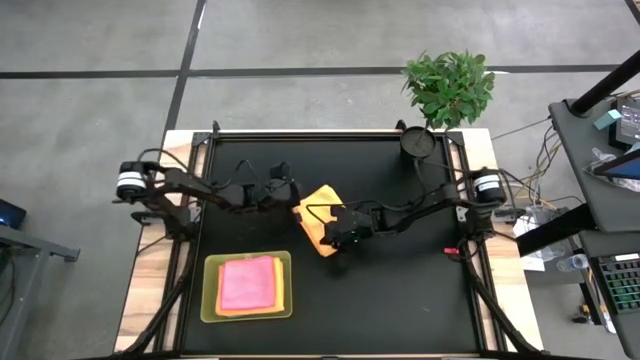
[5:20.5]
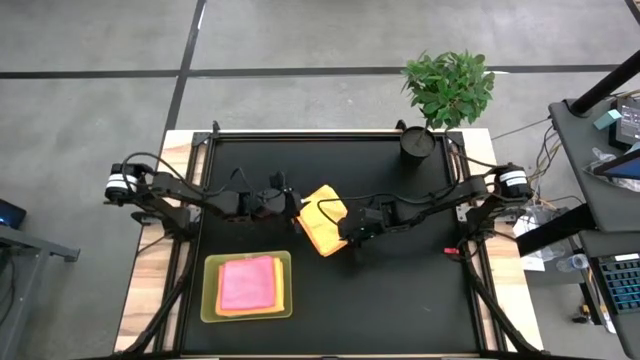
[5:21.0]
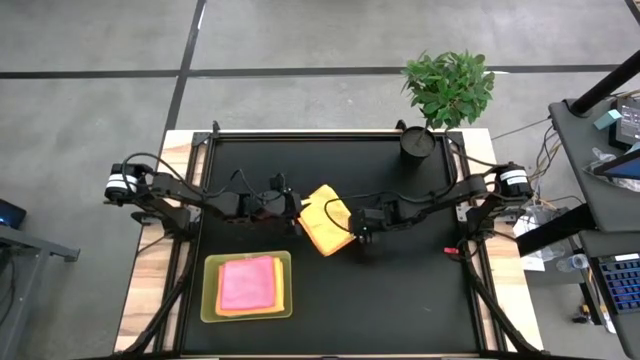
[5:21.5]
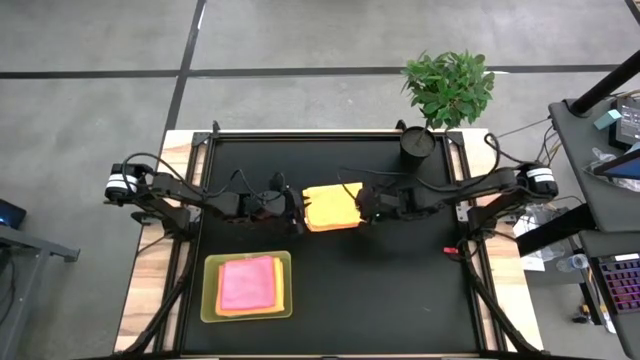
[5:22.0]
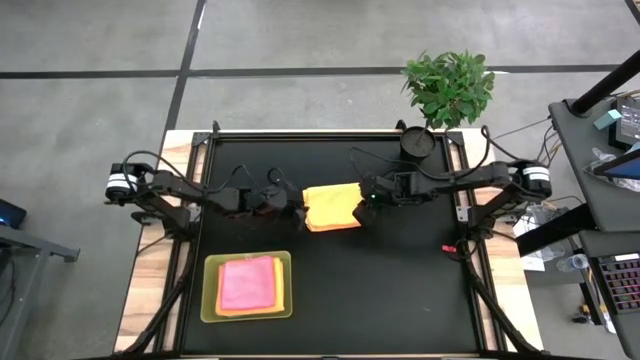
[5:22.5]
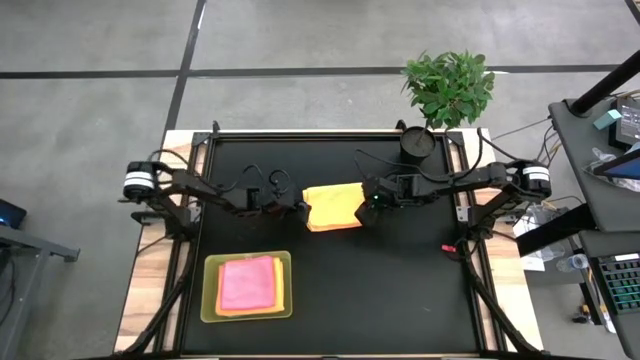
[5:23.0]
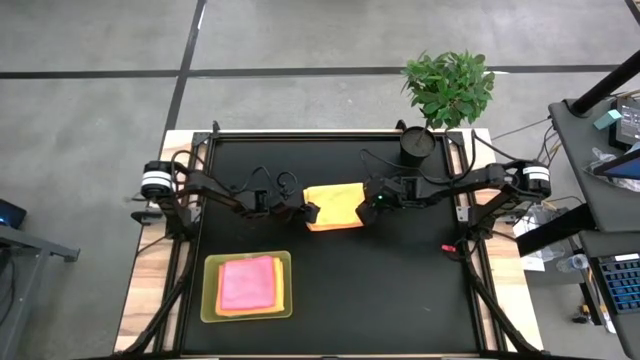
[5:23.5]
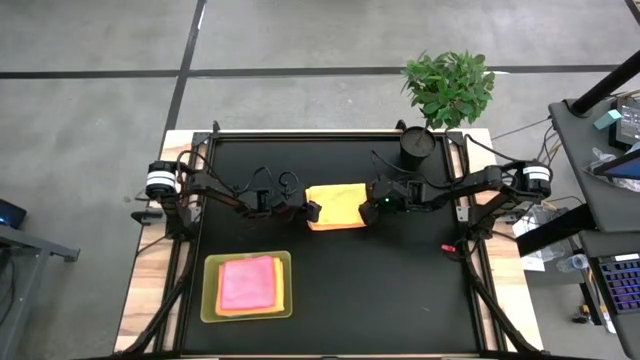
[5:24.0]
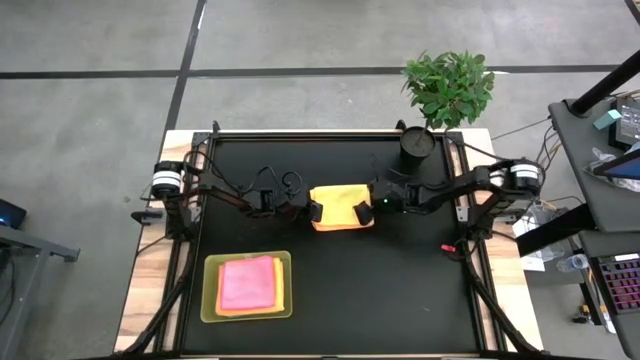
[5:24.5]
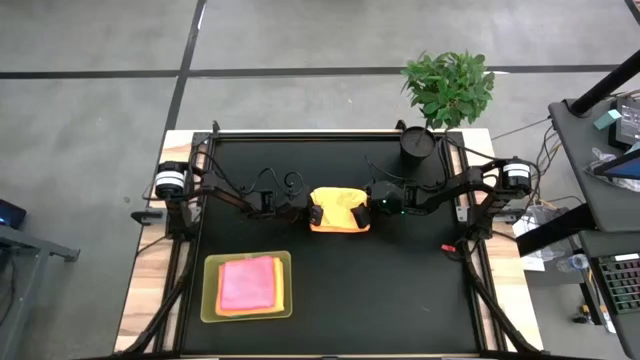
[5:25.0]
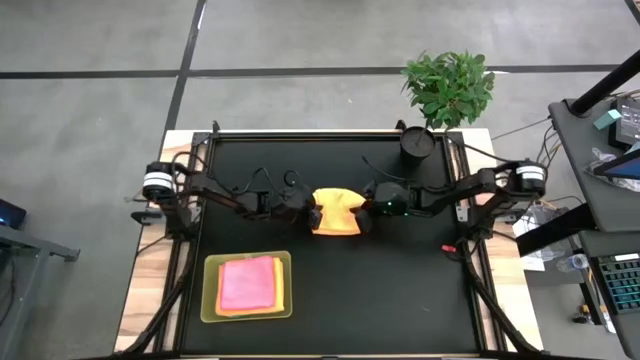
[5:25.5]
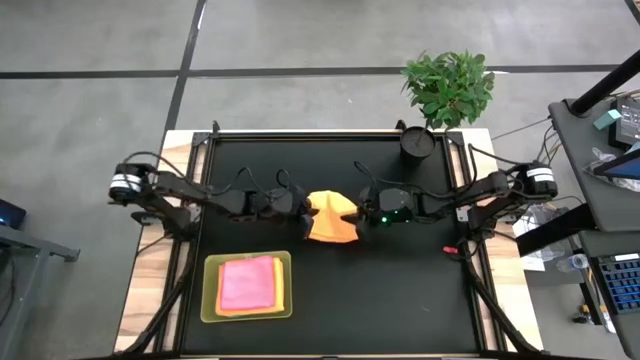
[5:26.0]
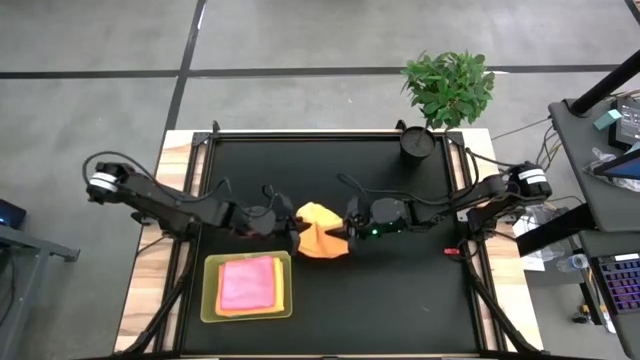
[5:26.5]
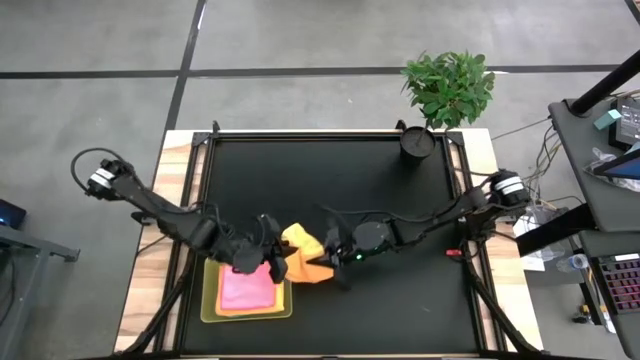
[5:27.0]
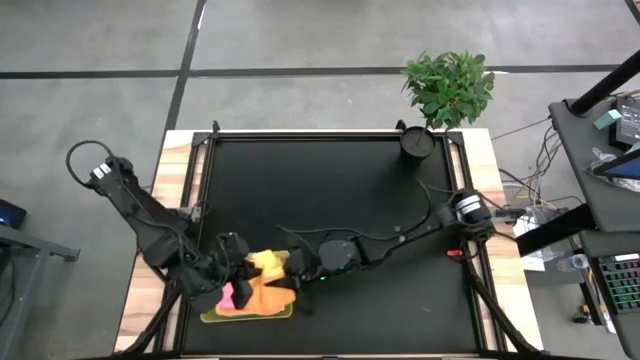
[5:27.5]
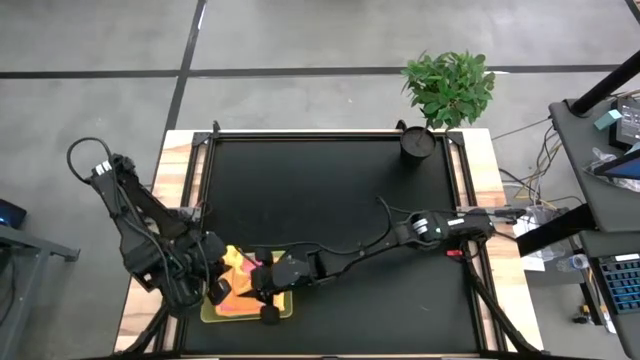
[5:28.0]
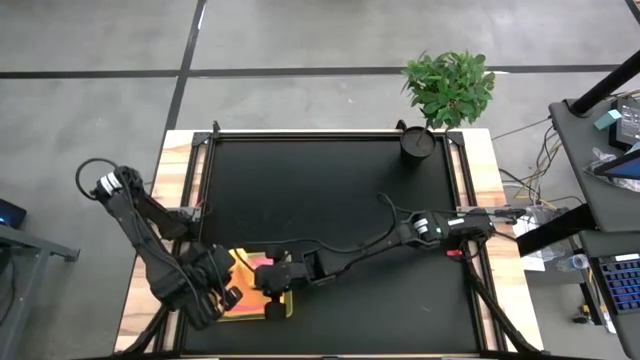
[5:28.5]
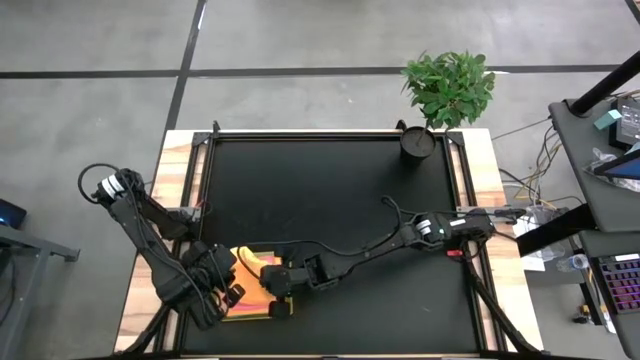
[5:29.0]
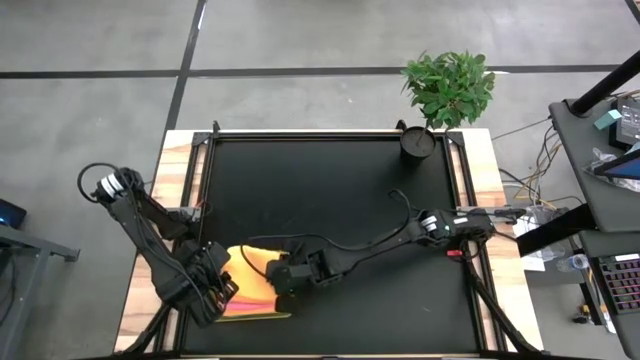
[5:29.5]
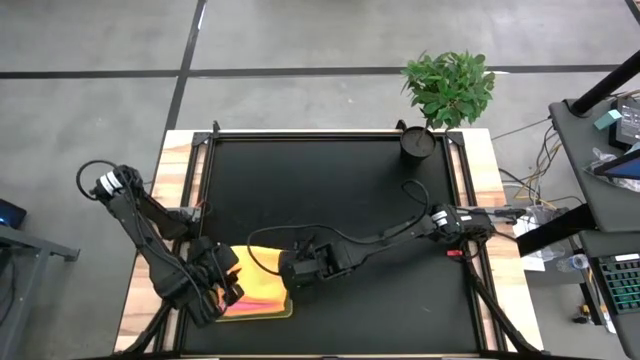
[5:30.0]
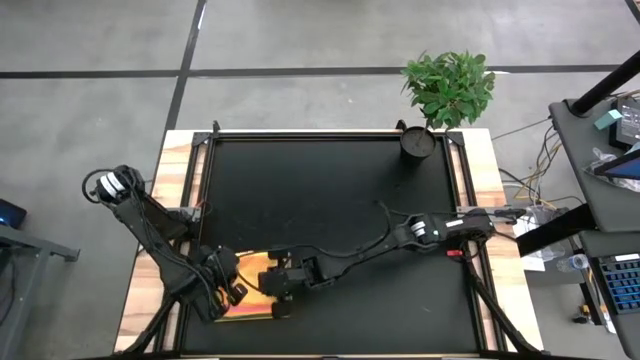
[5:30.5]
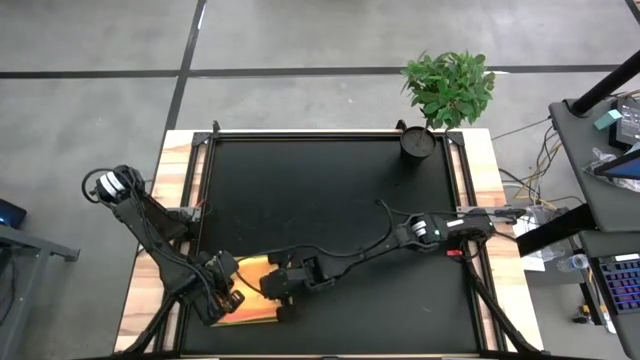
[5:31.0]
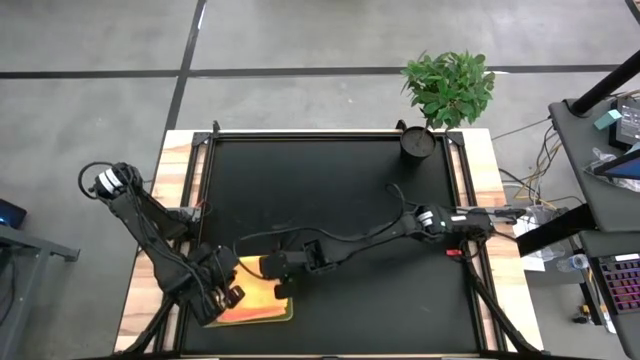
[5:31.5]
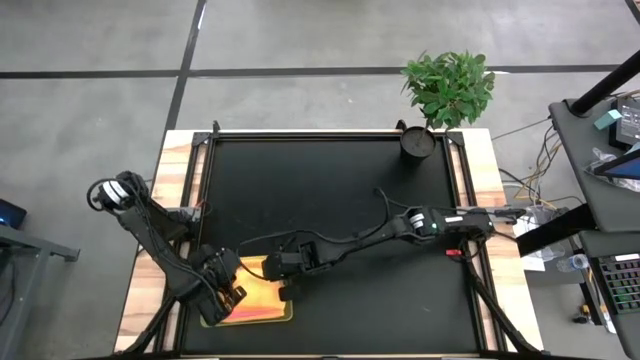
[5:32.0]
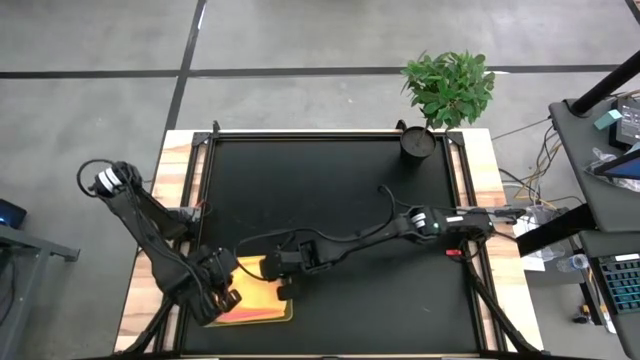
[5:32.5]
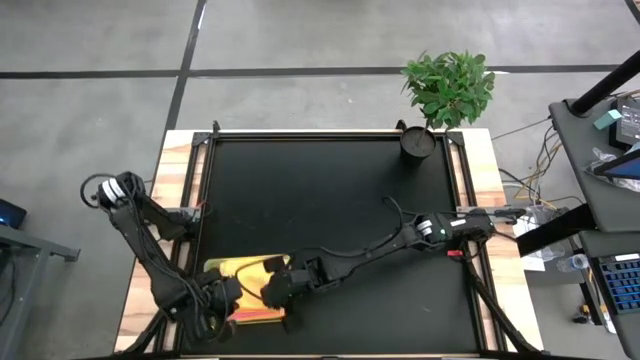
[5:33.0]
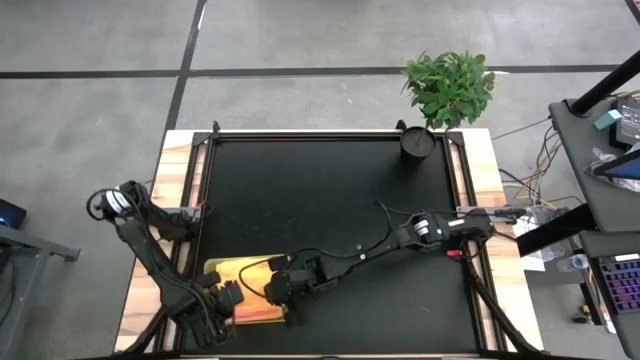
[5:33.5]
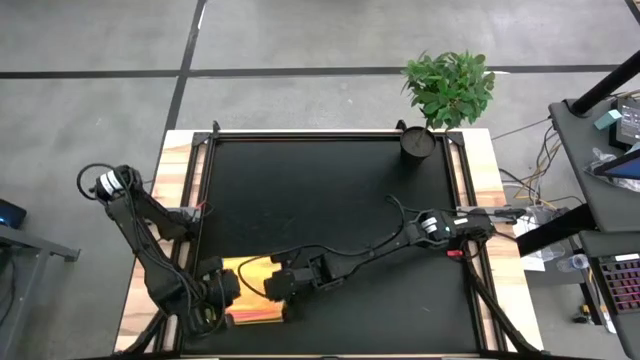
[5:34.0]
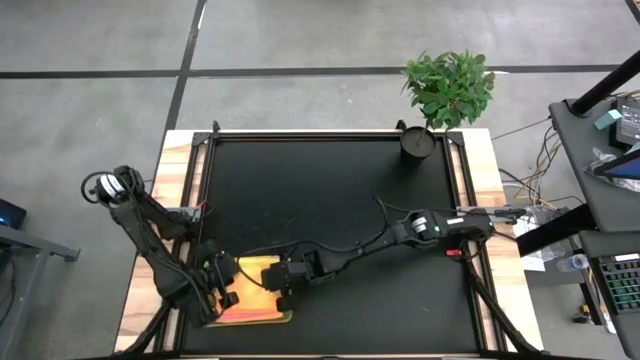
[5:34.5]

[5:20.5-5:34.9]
Task: Fold microfiber towels
Put the folded orange microfiber towel into the yellow bin

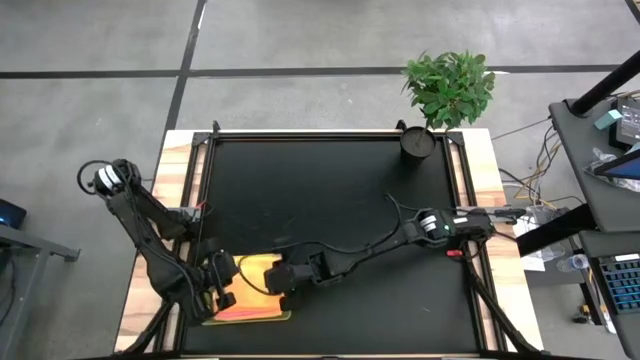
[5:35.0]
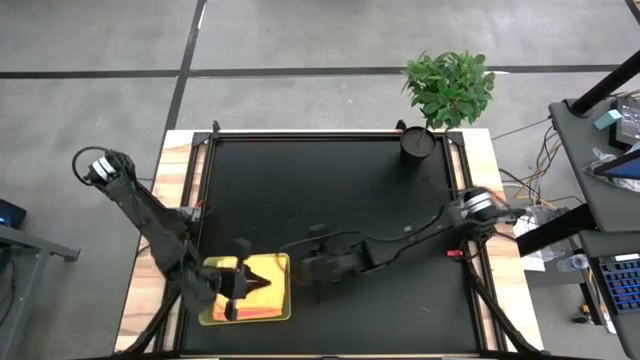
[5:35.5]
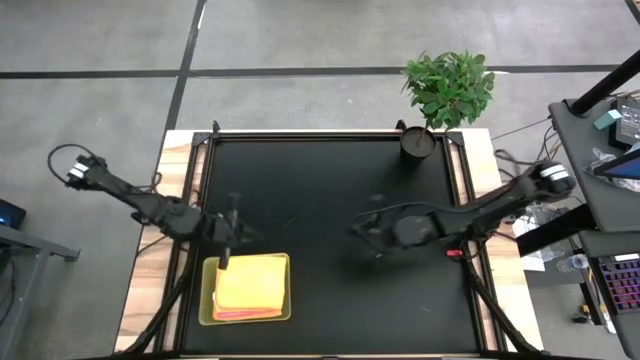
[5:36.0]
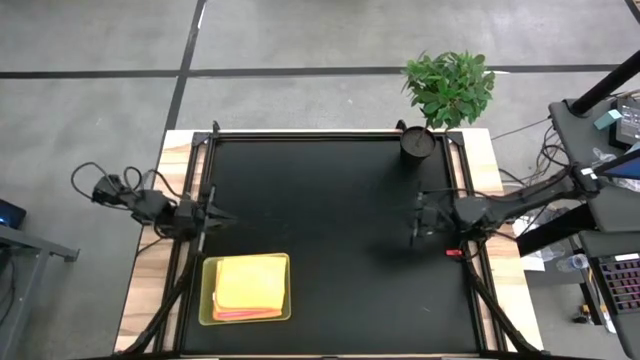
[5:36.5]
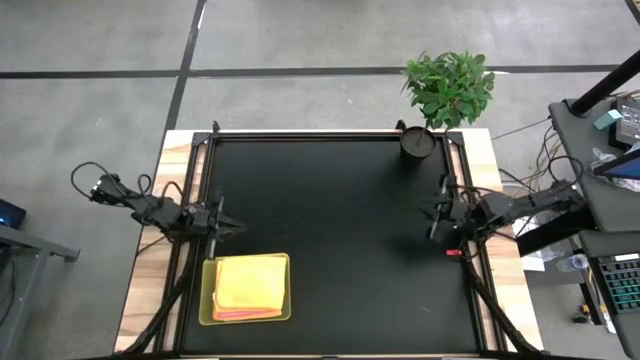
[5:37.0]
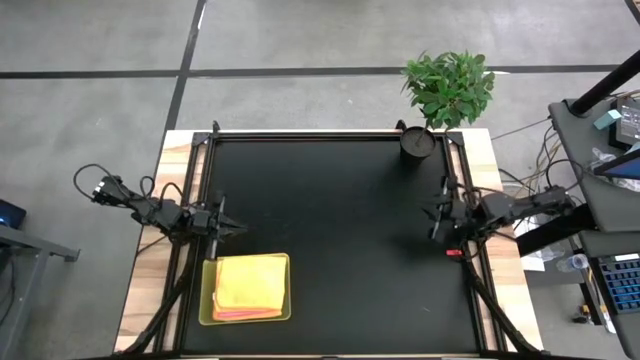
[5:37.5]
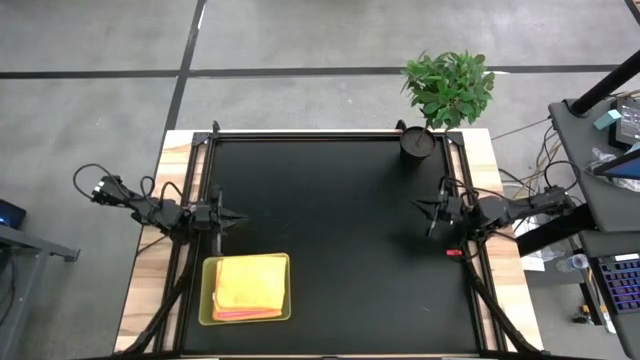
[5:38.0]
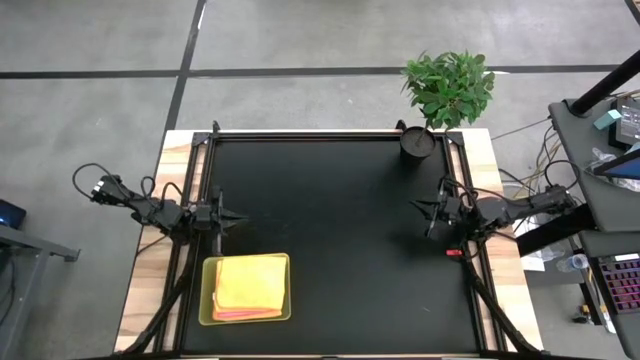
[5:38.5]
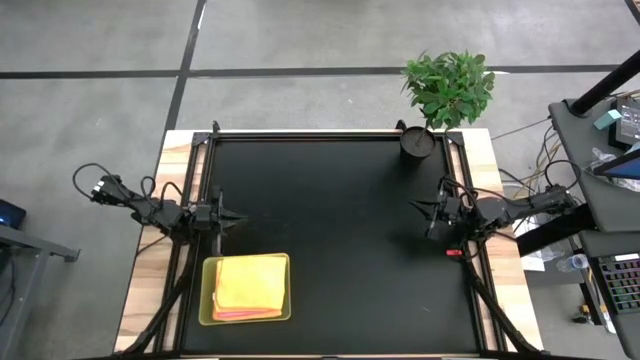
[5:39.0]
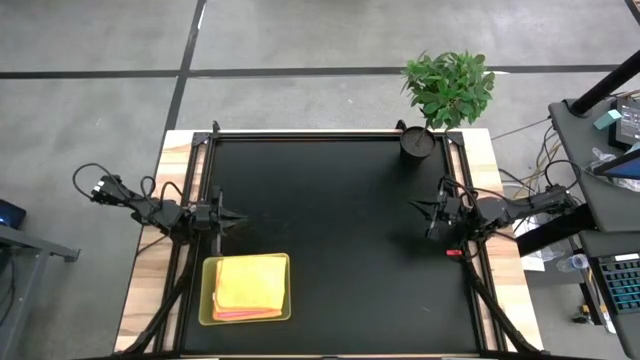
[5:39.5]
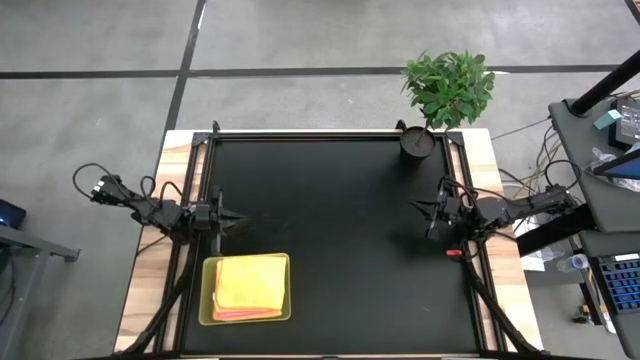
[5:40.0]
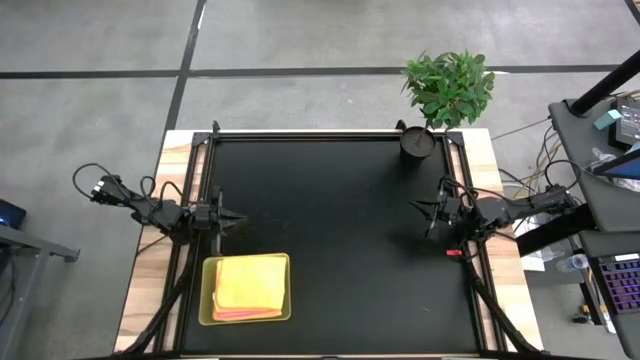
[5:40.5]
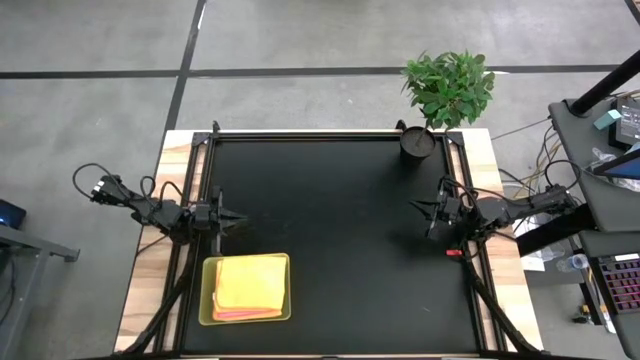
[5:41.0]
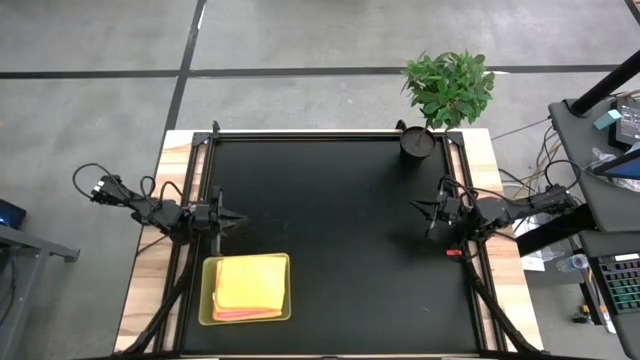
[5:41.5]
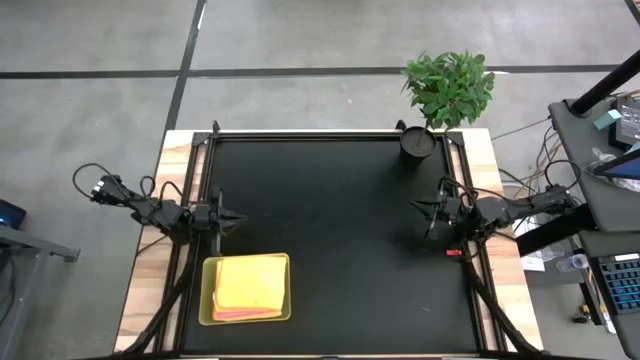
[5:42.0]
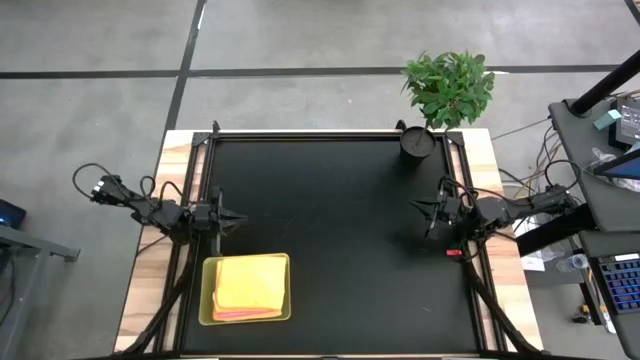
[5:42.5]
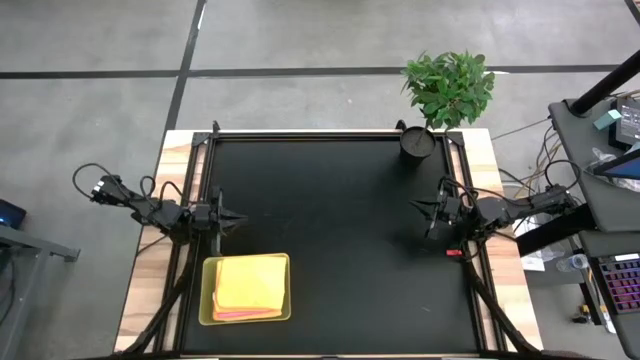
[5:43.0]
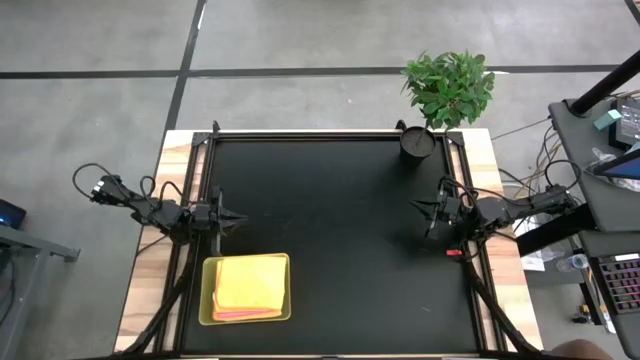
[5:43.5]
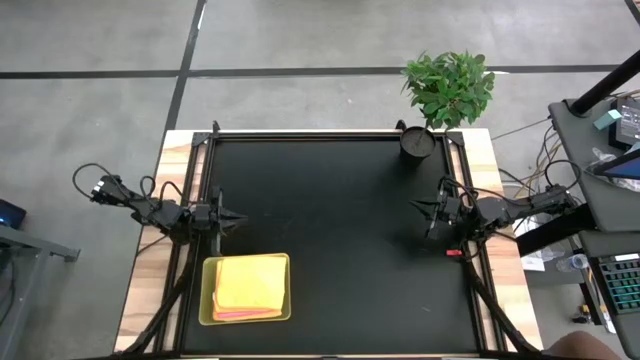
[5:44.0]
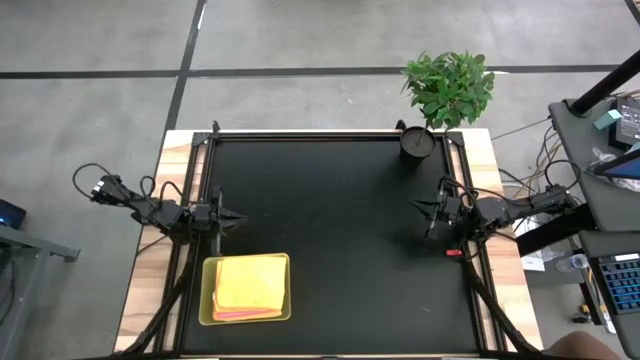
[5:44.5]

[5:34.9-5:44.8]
Return to Home Position
